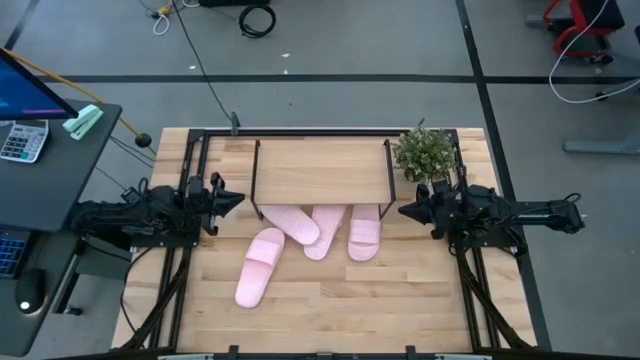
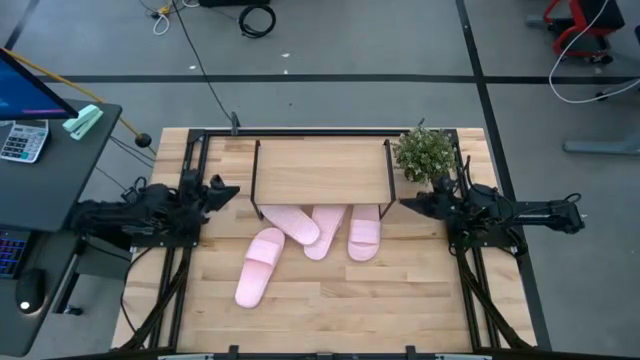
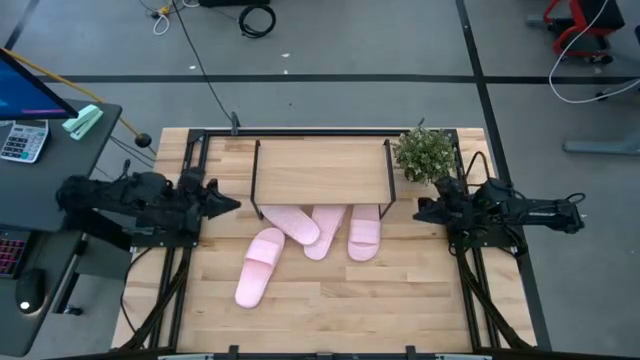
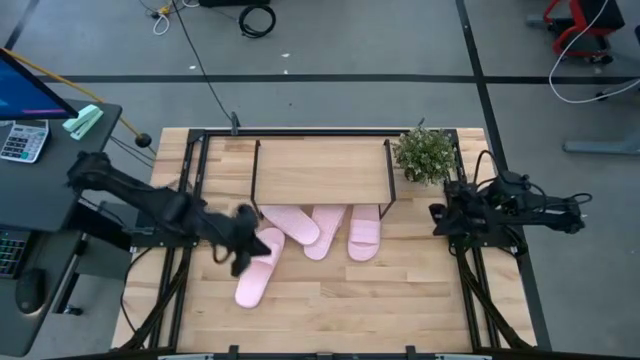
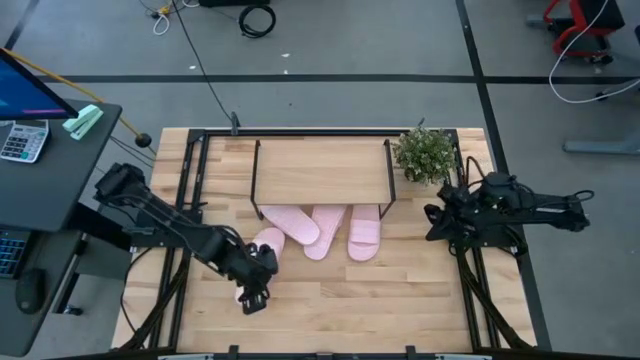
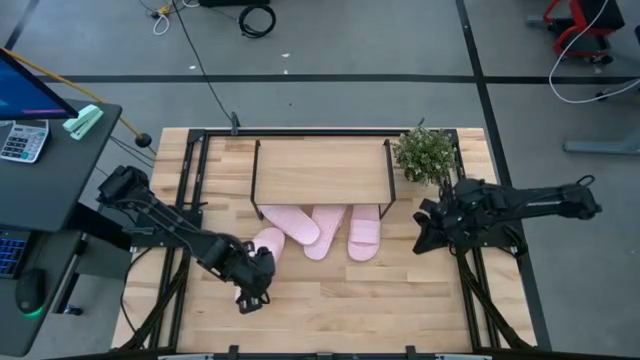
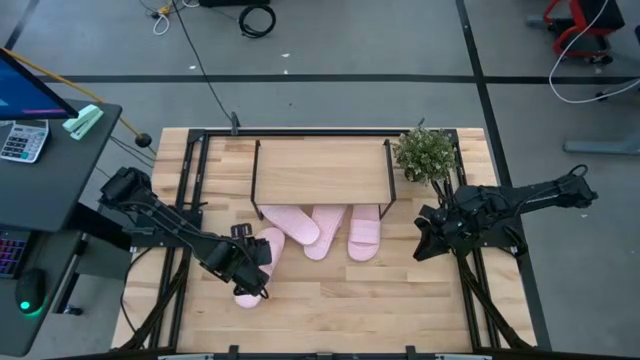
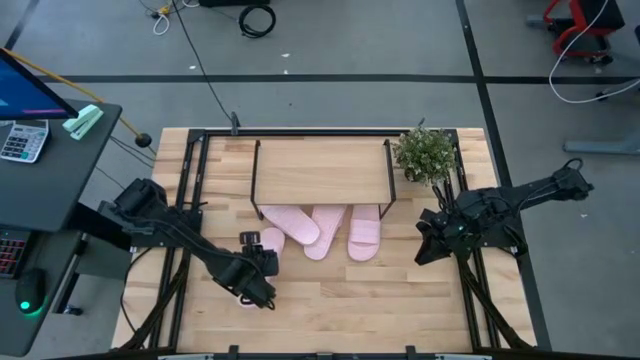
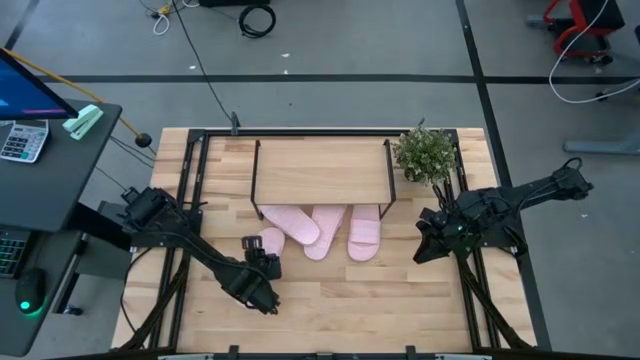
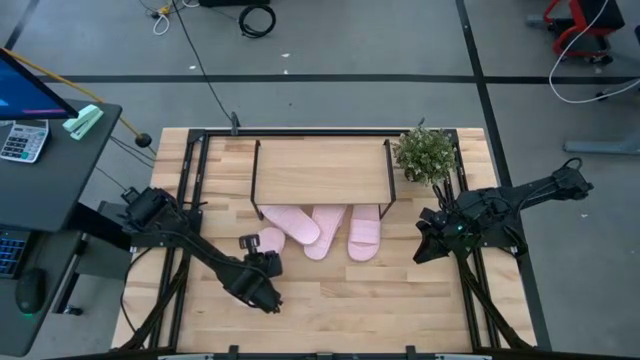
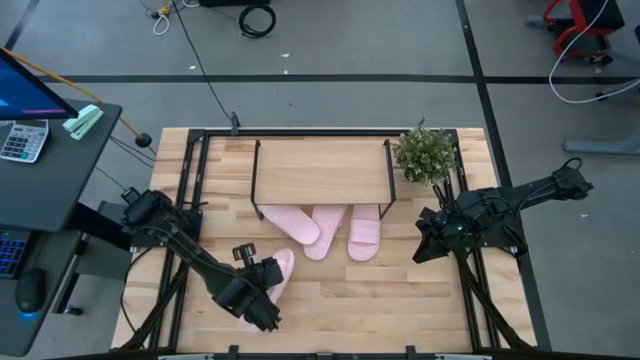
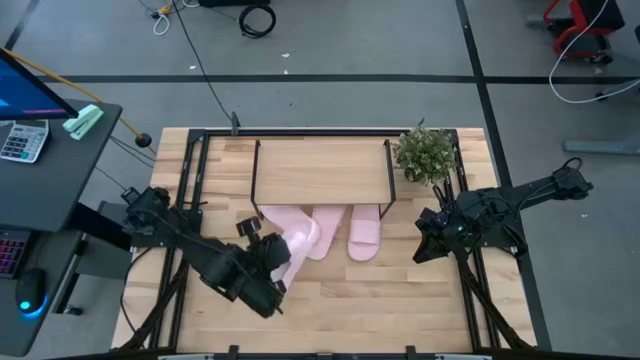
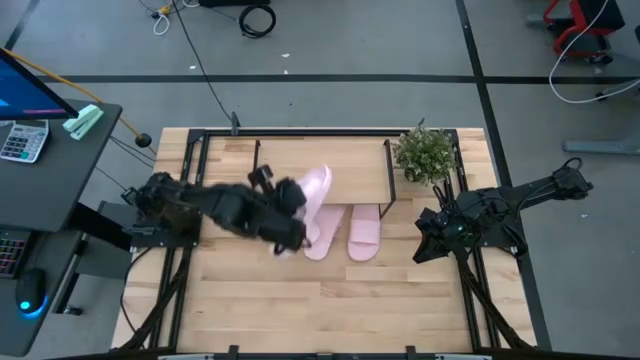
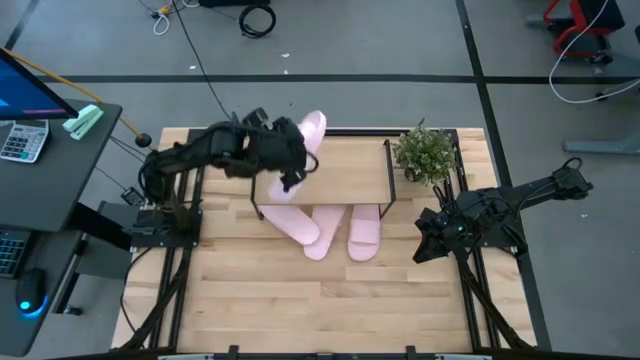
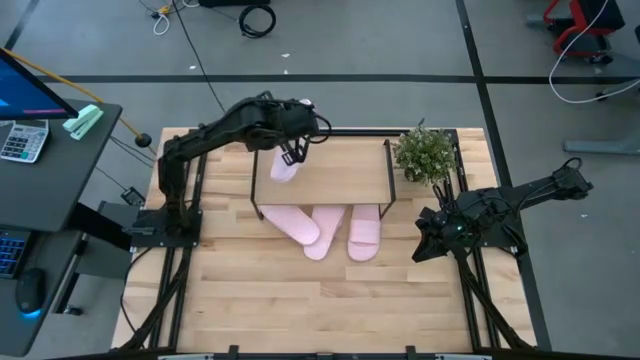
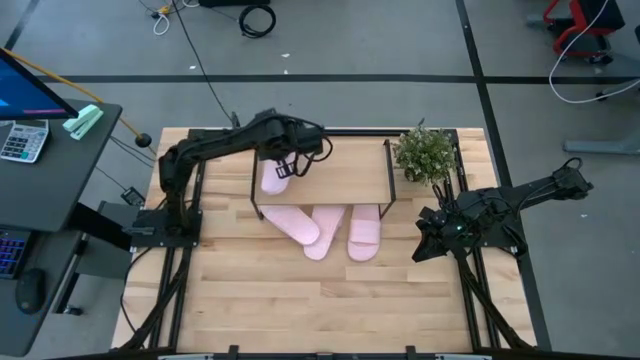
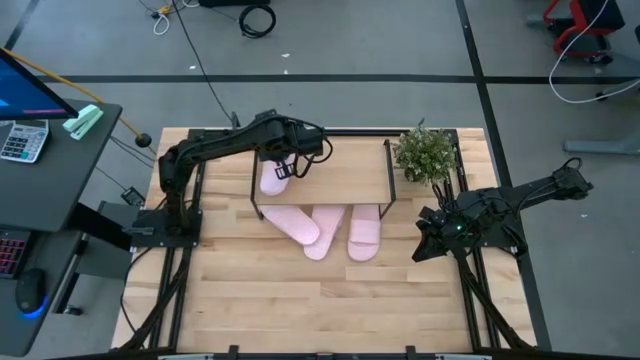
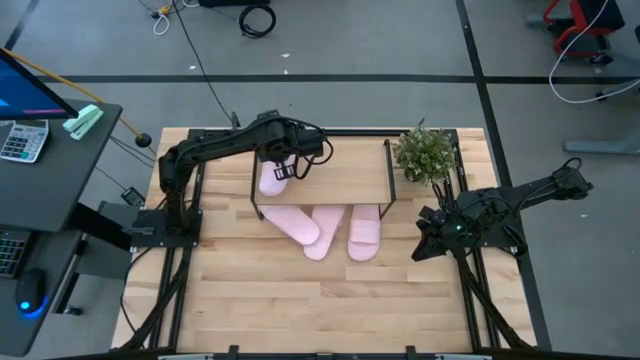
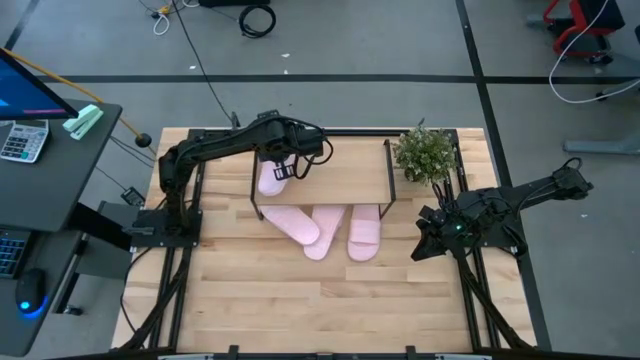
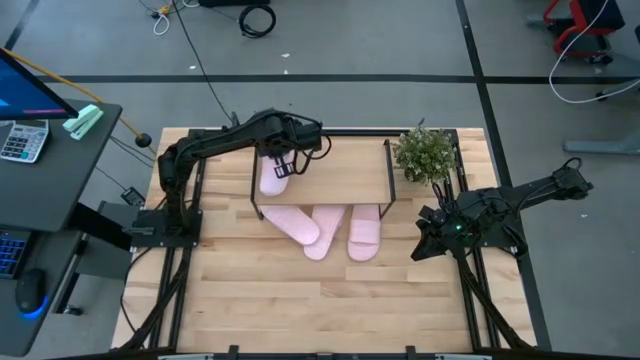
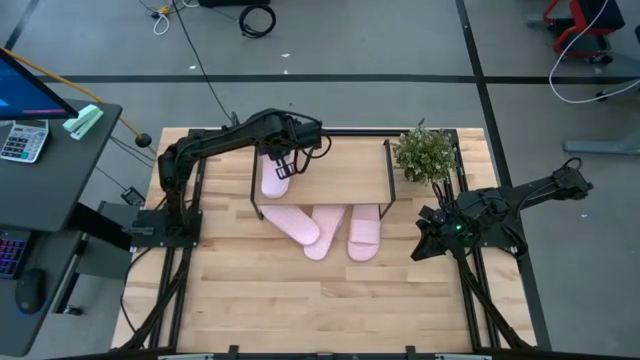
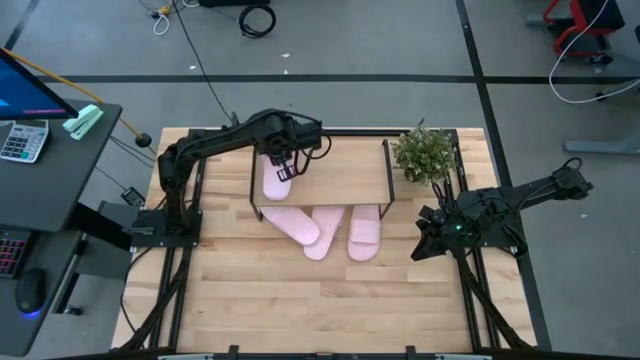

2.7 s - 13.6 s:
Task: Pick and place slides into the shelf
Put the pink slipper on the shelf

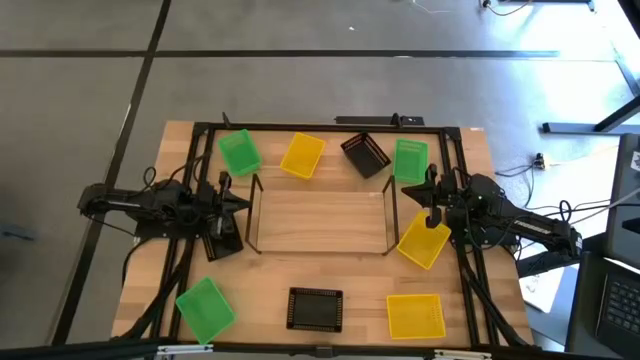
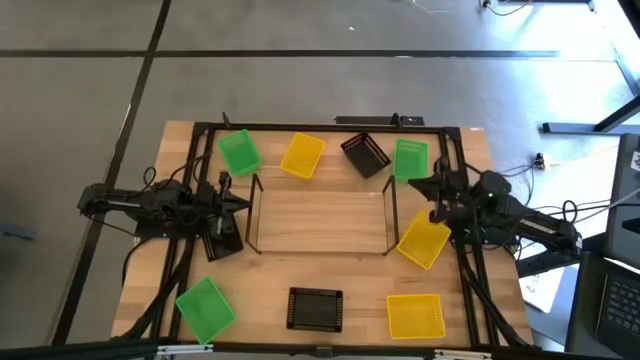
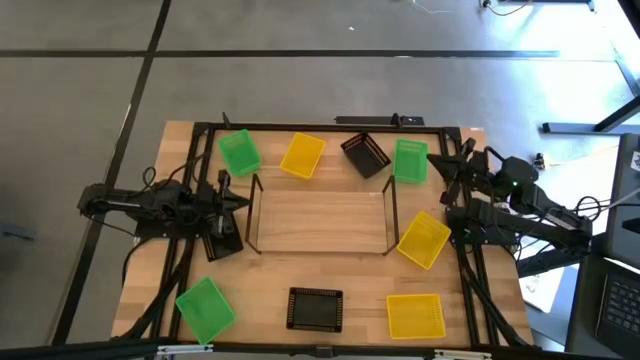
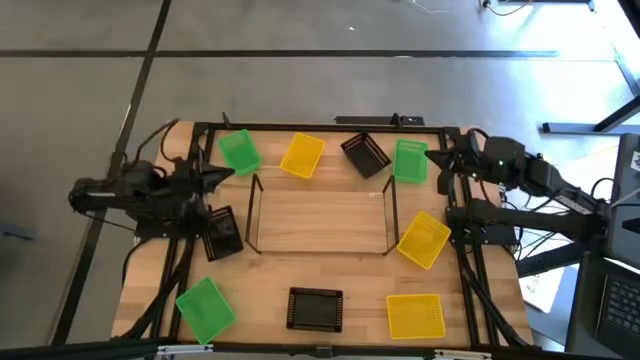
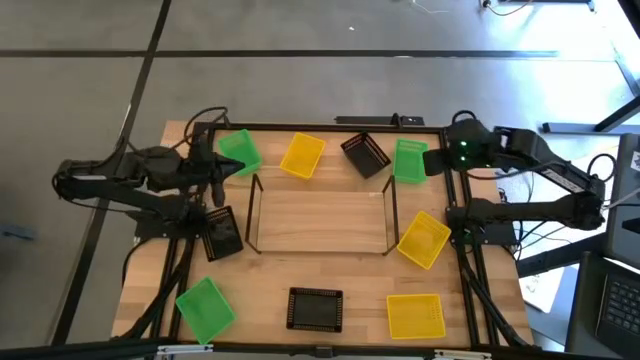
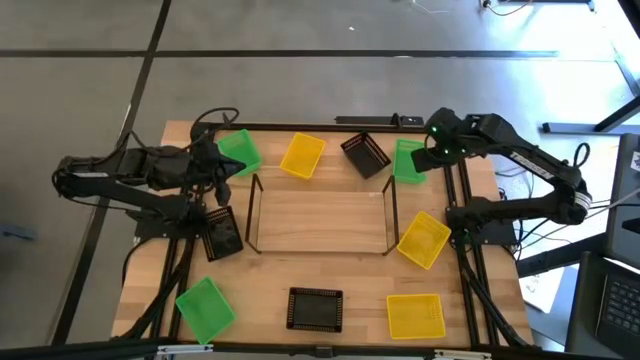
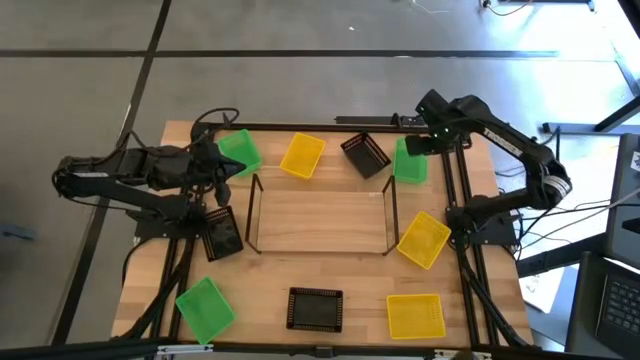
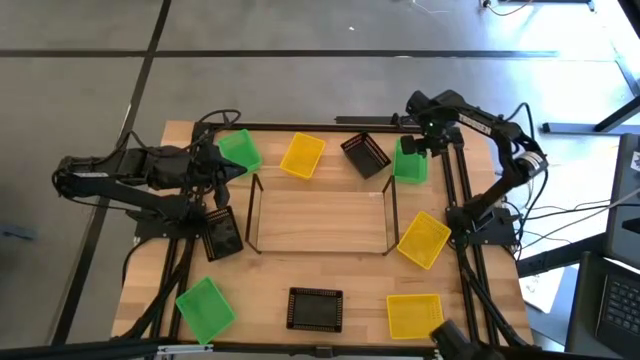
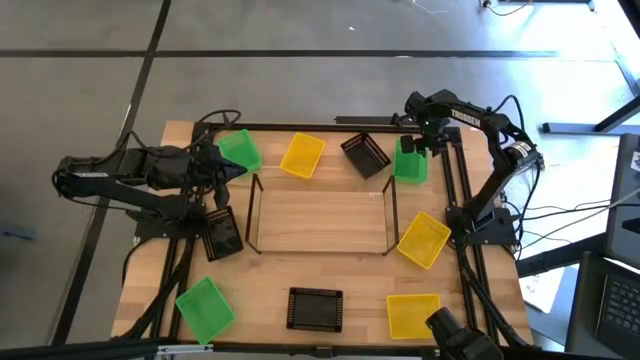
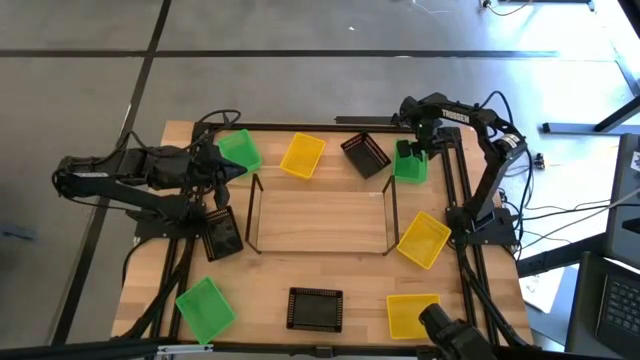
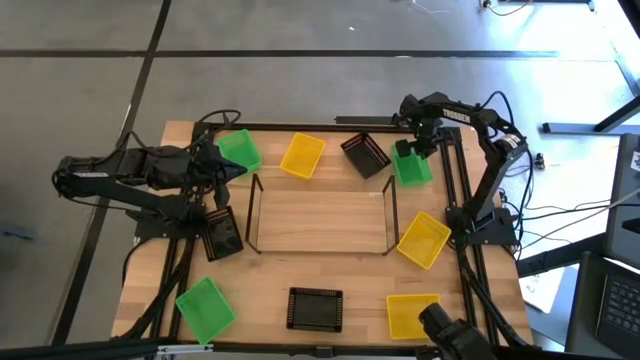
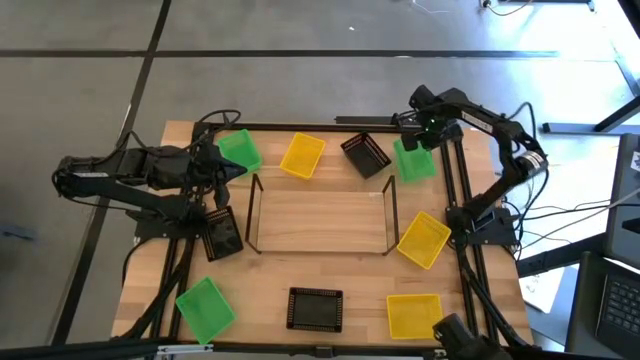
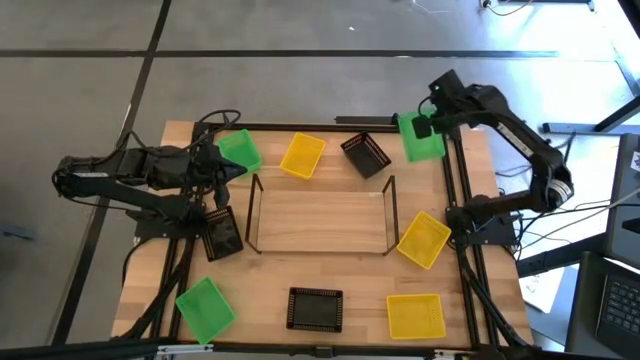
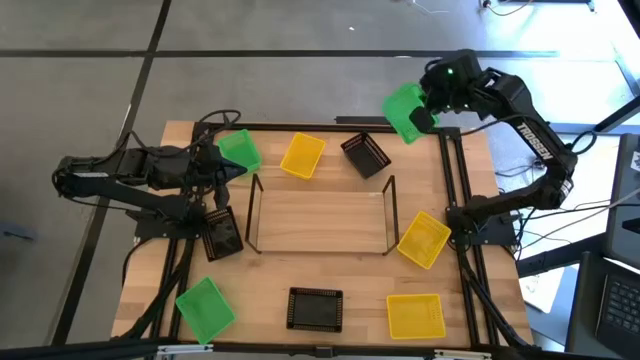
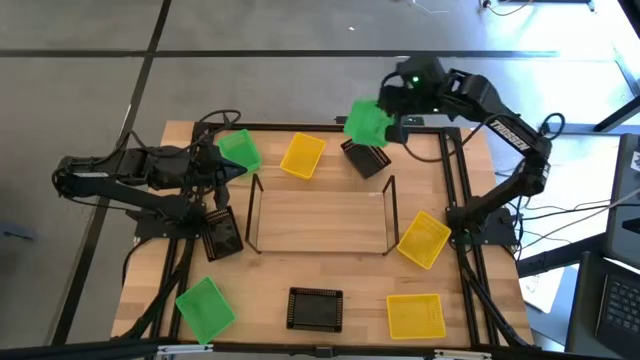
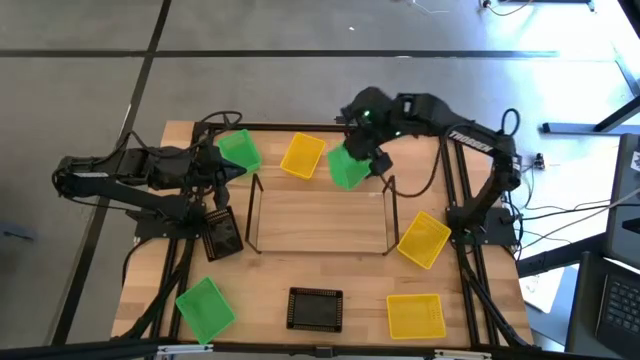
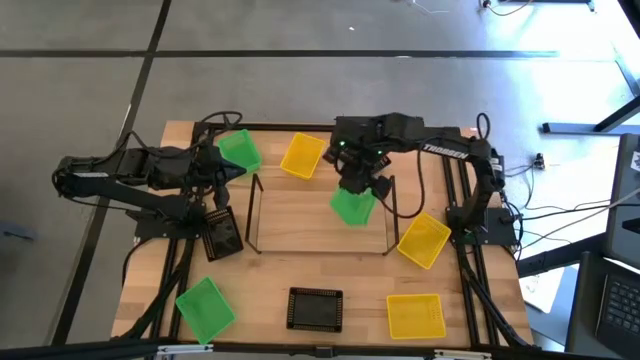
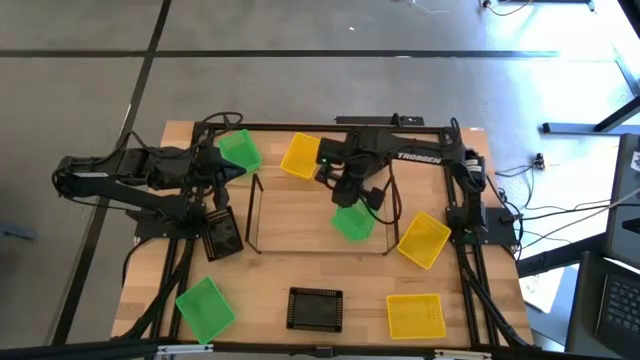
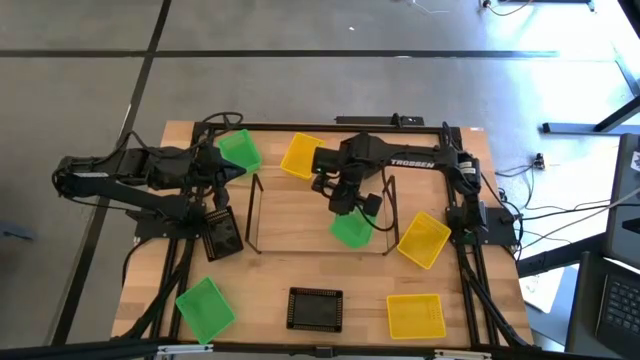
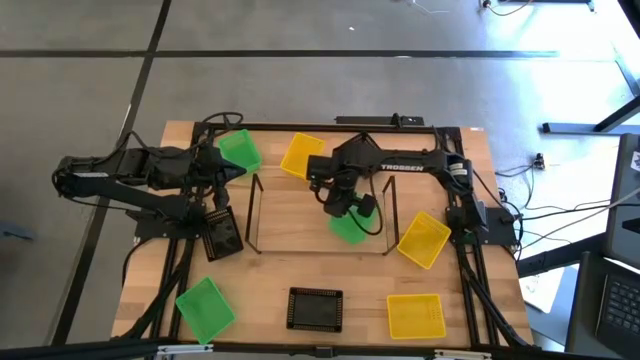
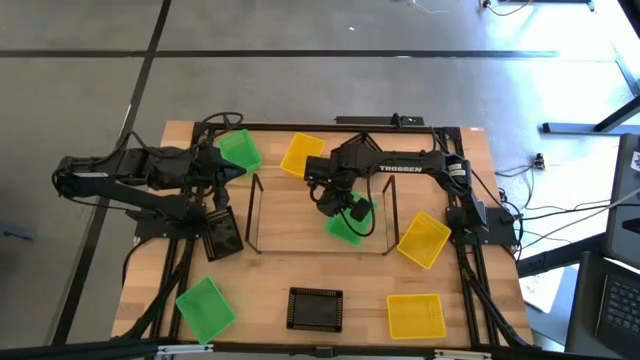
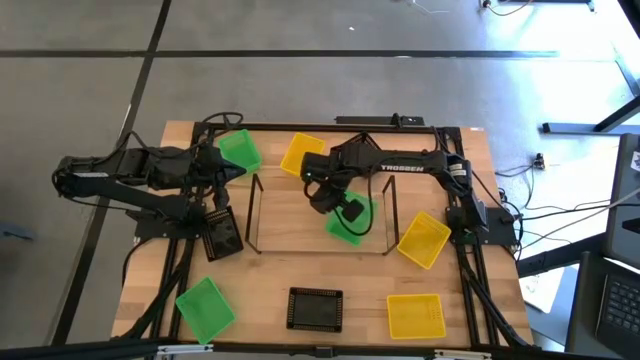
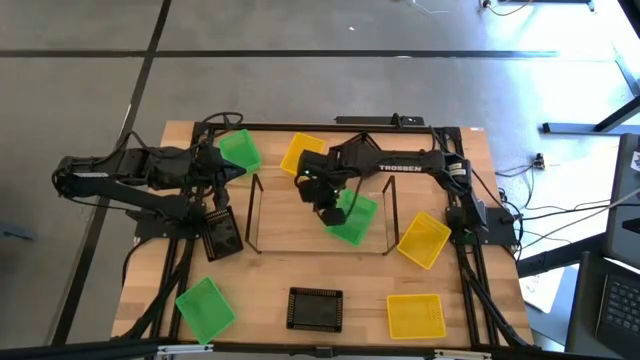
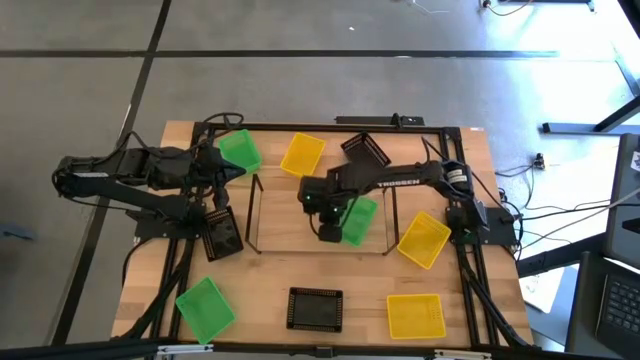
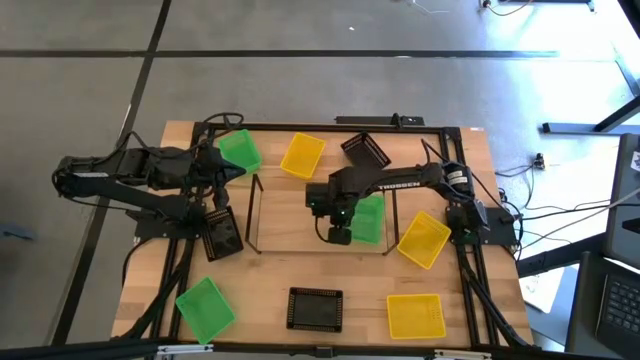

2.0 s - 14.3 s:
Task: Stack baskets on shelf by color
Put the top right green bin on the shelf
